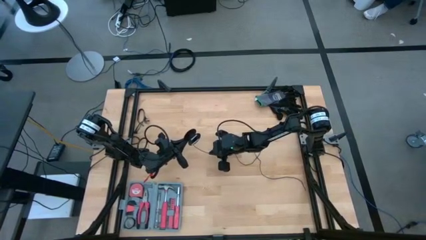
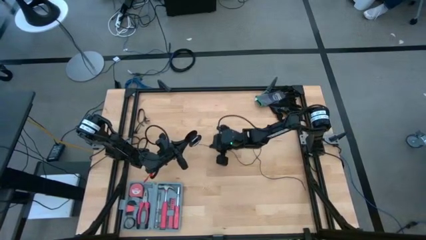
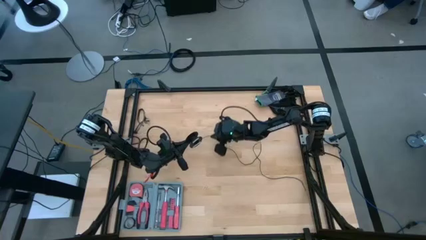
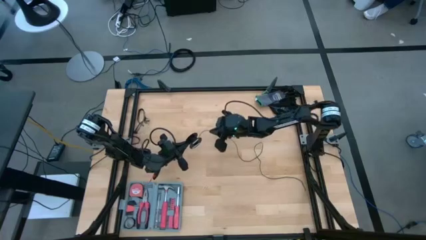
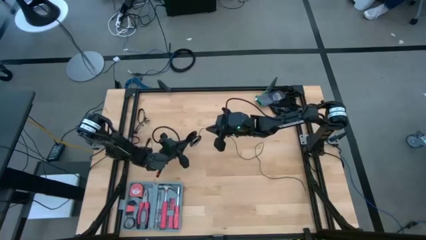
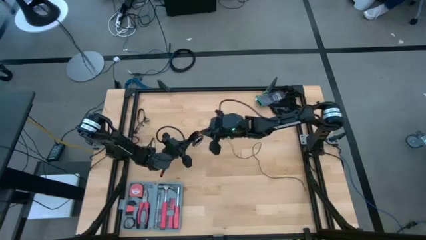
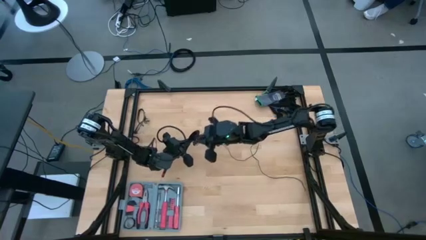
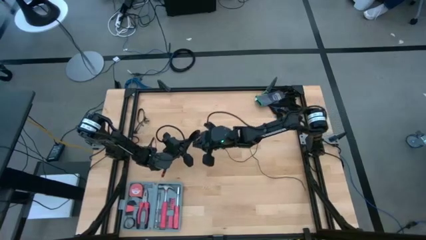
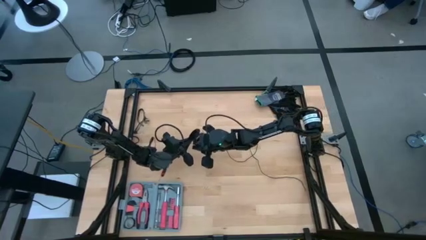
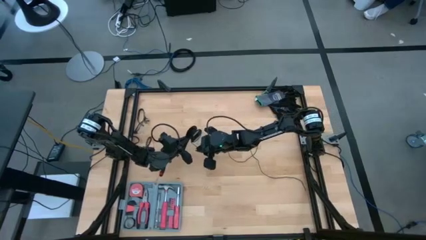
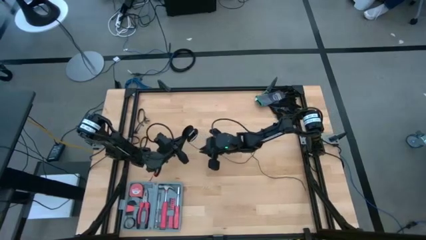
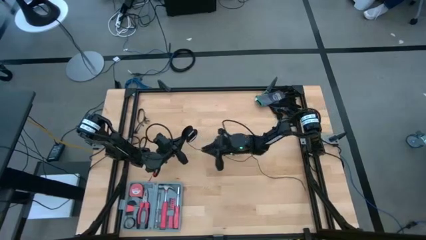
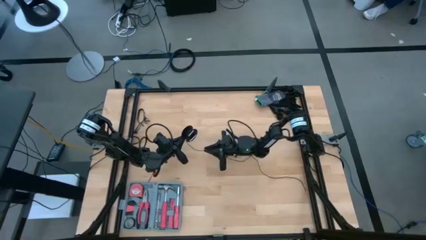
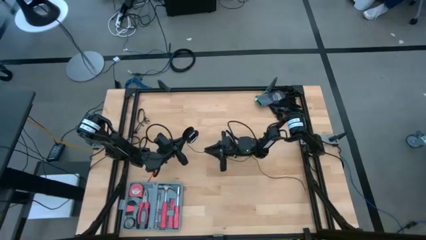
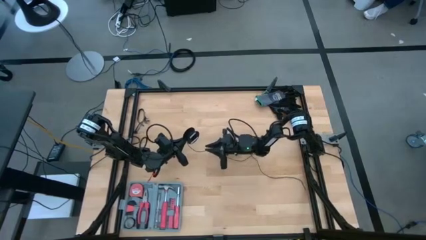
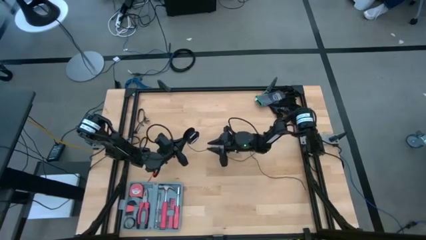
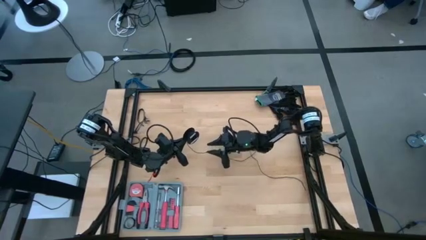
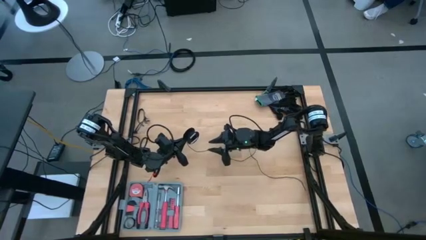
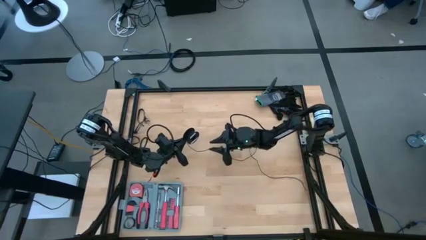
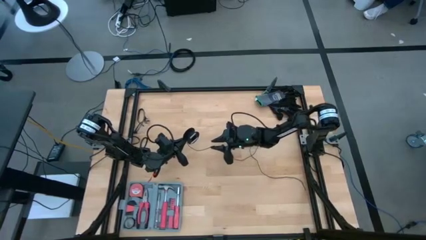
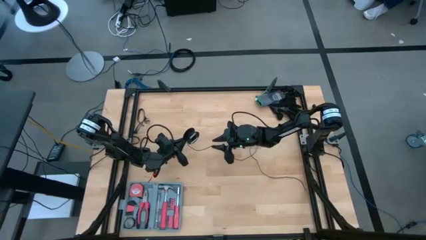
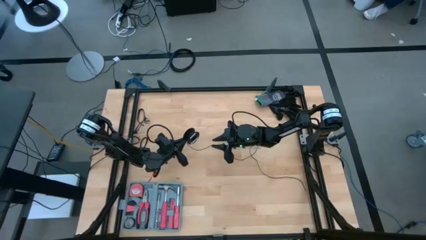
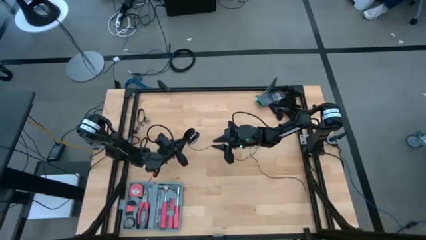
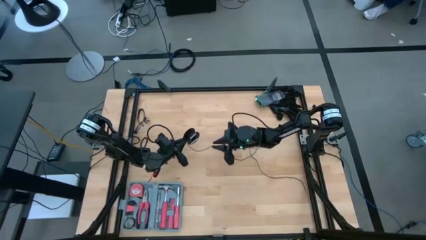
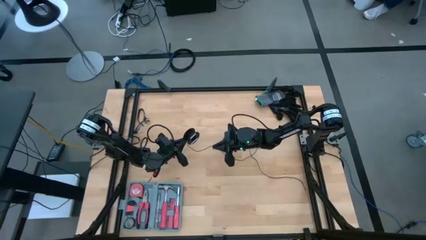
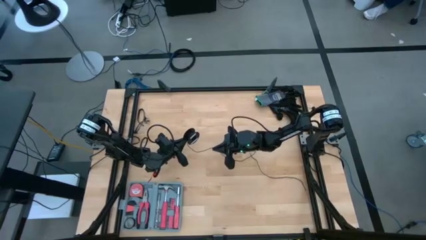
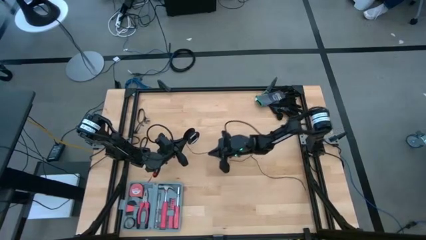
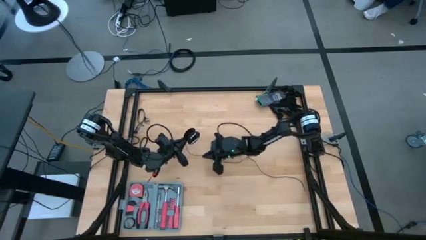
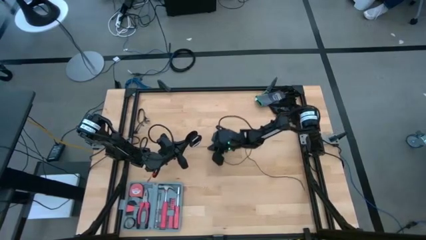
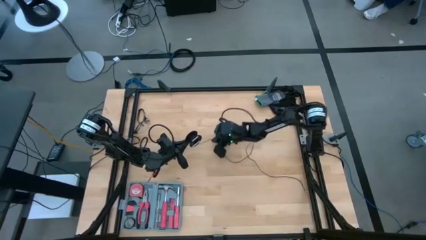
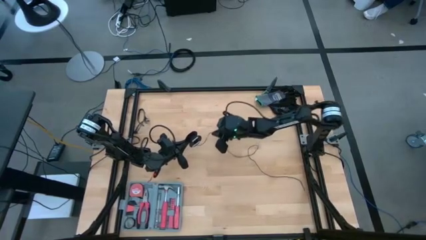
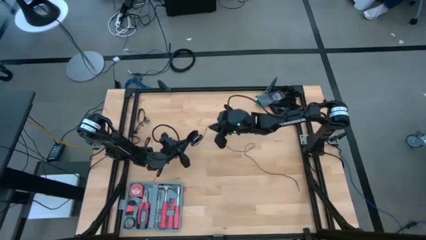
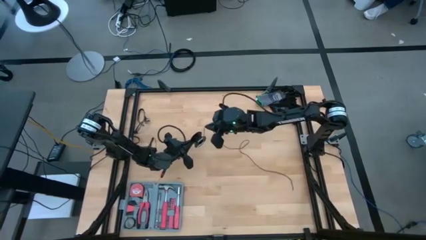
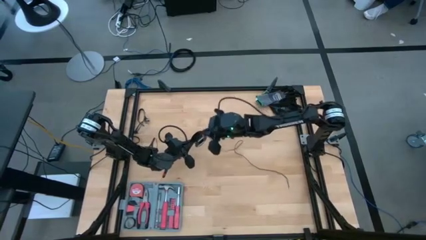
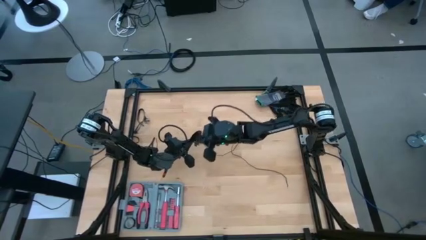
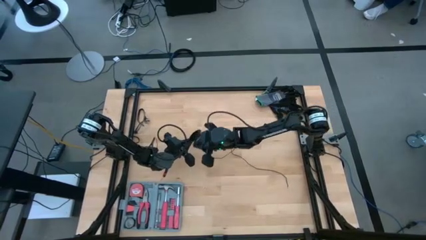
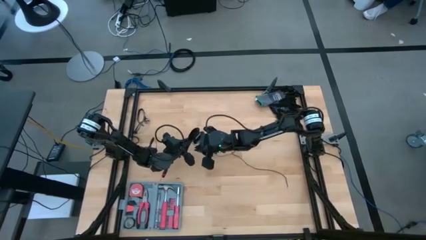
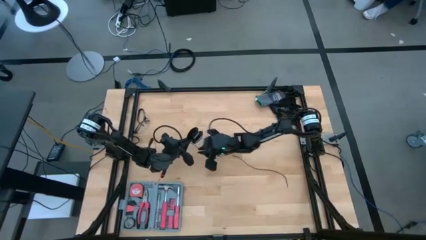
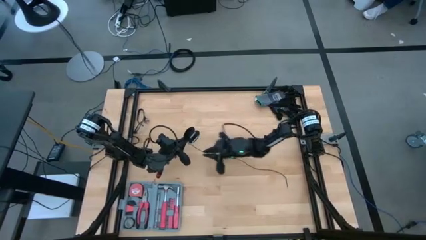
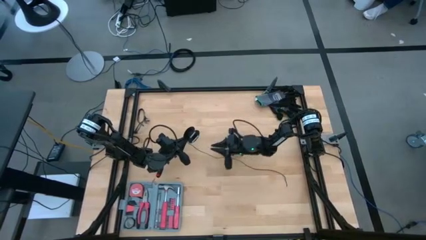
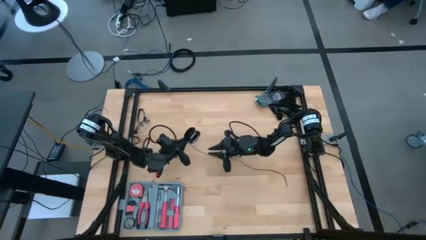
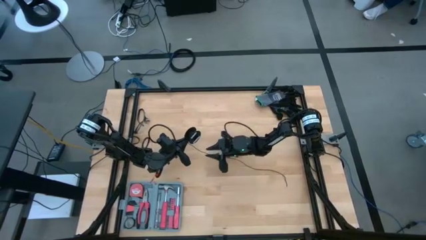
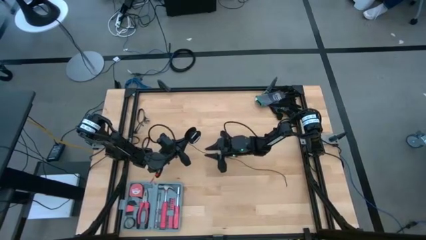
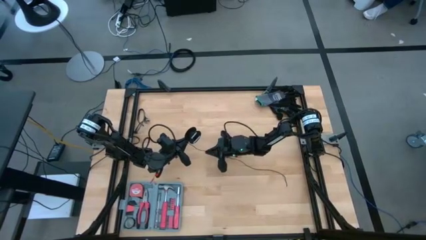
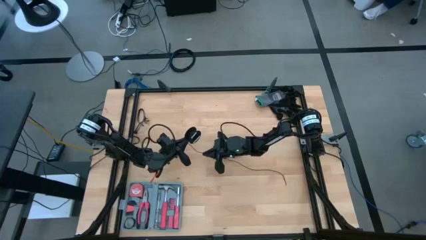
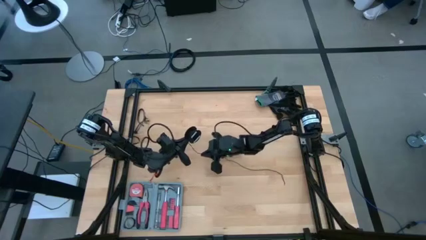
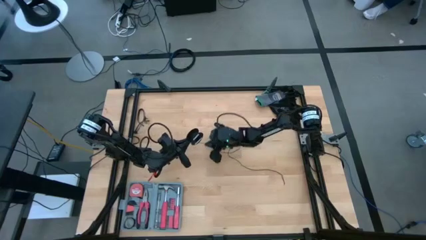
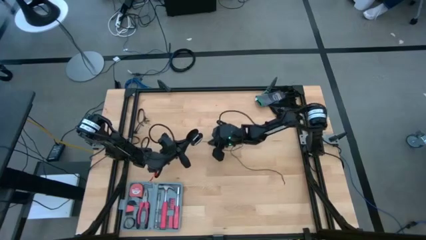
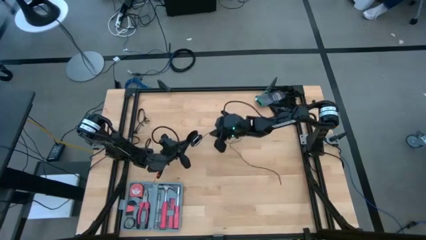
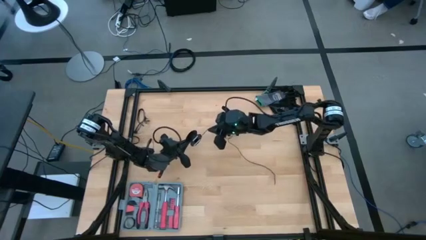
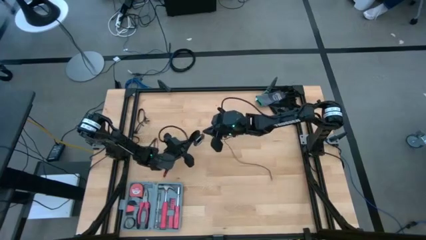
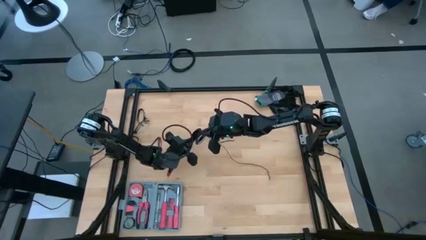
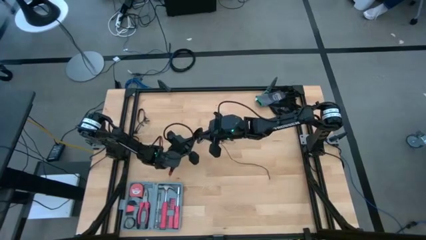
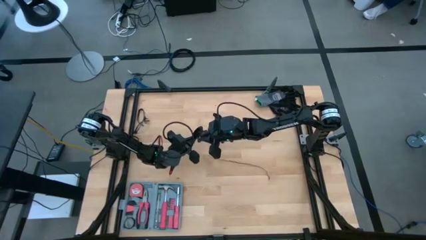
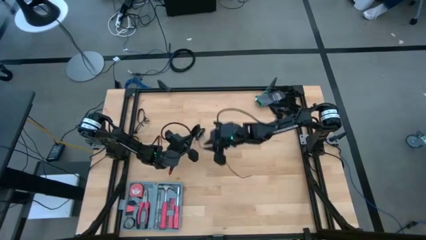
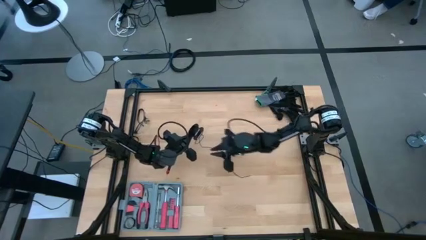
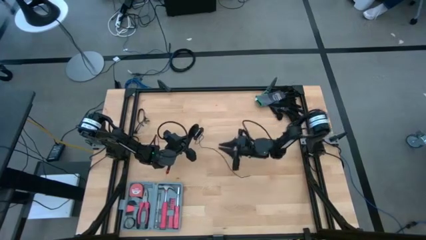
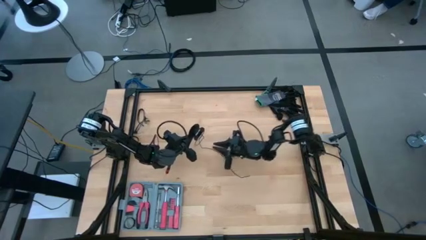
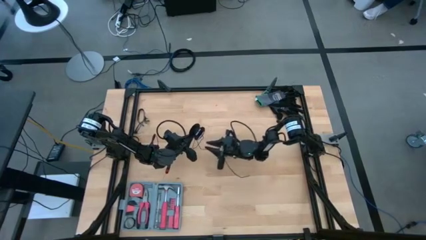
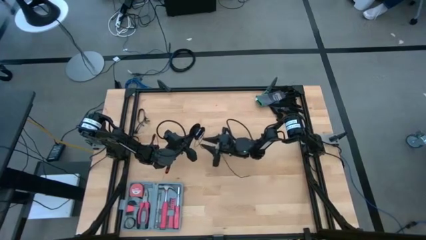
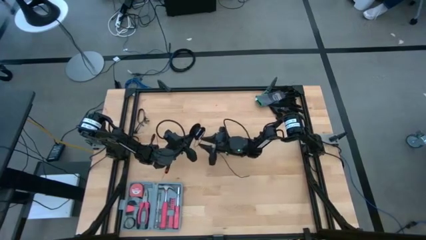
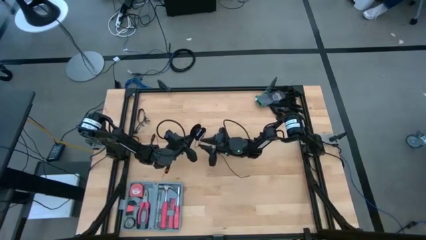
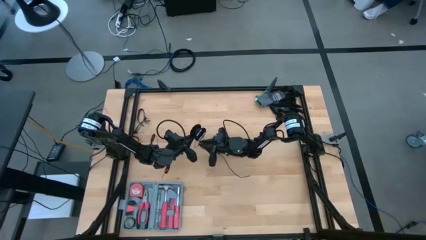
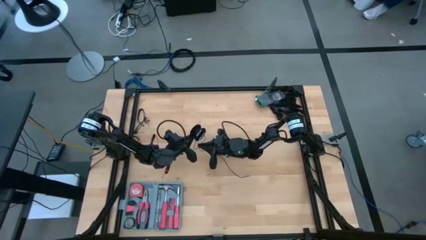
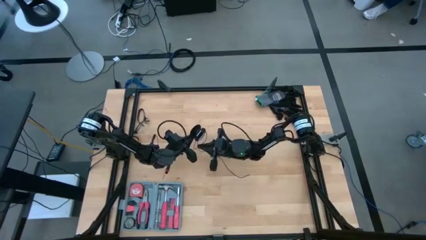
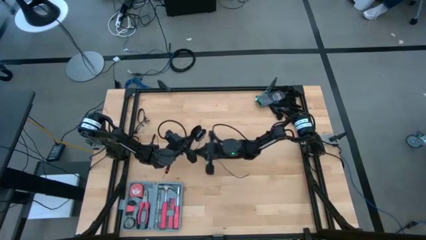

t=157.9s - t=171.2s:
Task: Coil cords
Coil the black wire onto the spool
